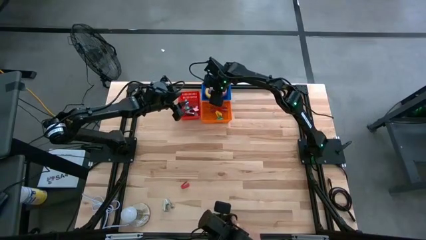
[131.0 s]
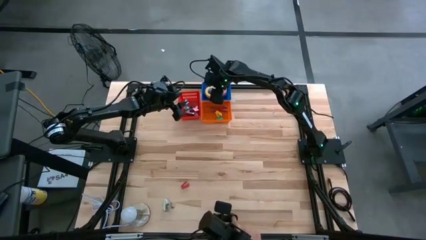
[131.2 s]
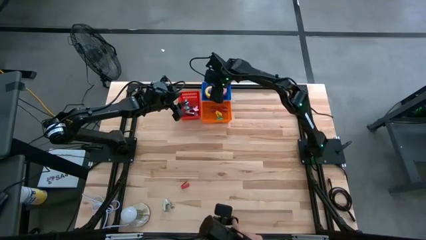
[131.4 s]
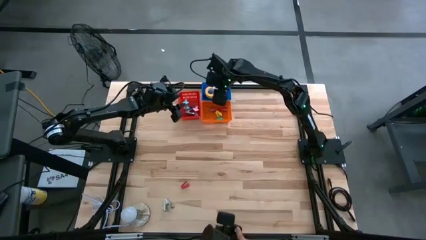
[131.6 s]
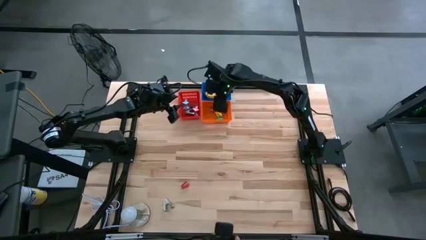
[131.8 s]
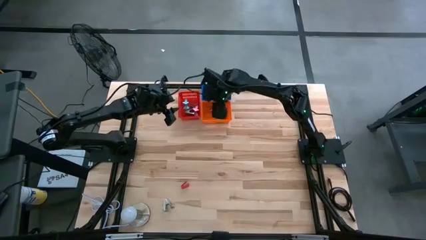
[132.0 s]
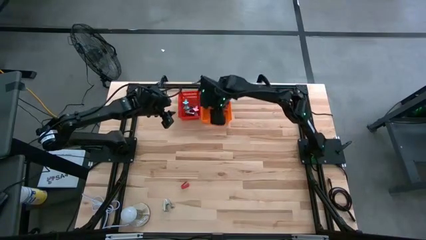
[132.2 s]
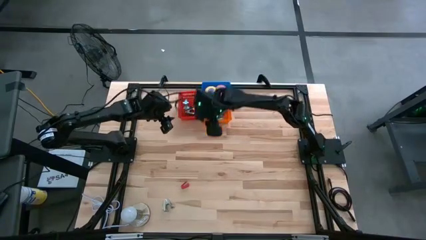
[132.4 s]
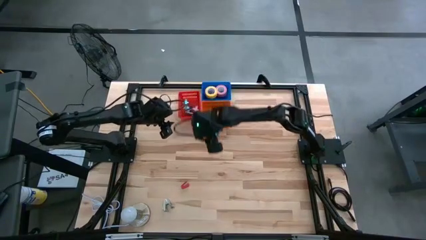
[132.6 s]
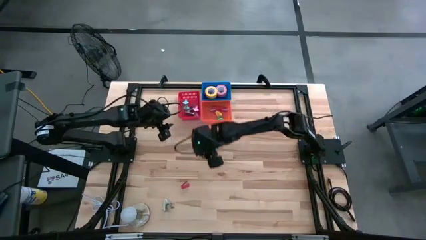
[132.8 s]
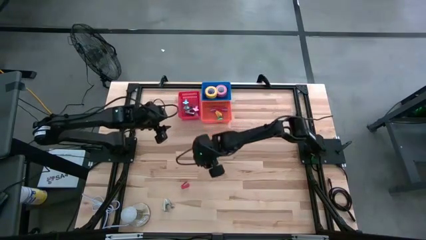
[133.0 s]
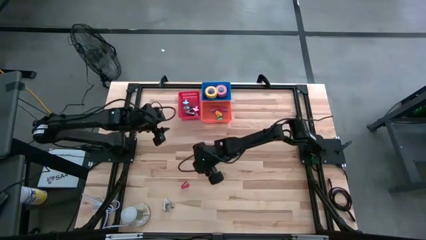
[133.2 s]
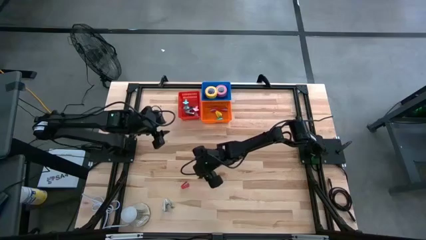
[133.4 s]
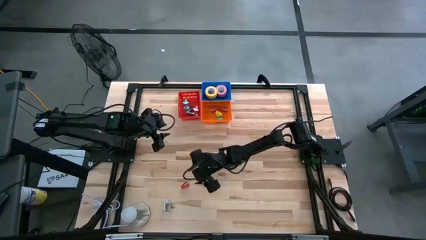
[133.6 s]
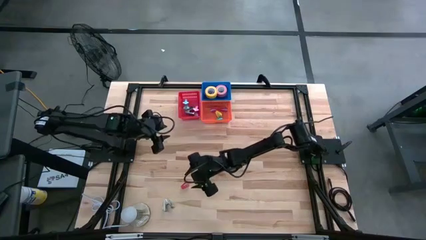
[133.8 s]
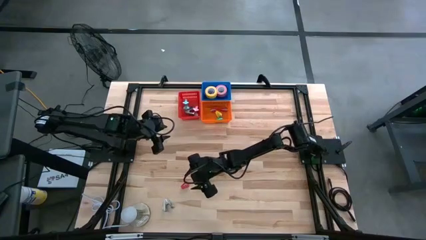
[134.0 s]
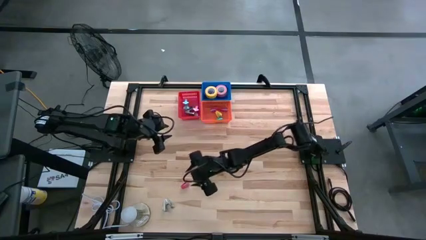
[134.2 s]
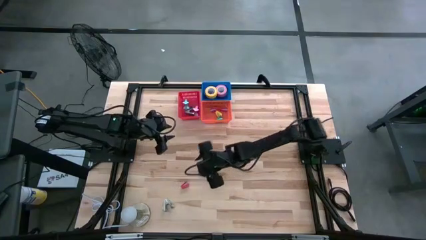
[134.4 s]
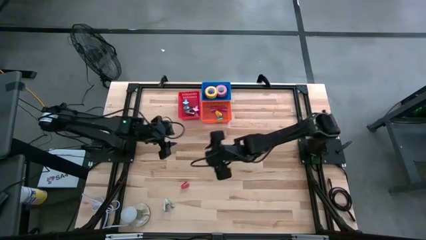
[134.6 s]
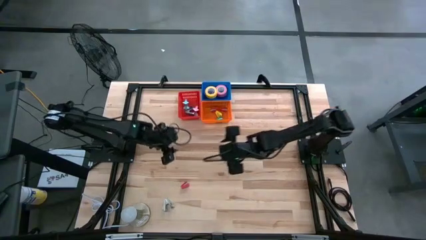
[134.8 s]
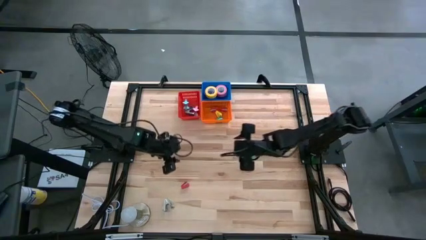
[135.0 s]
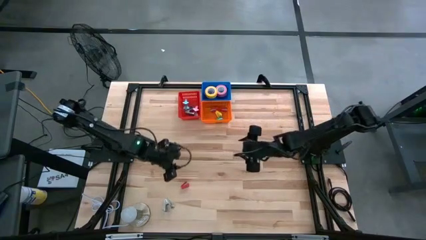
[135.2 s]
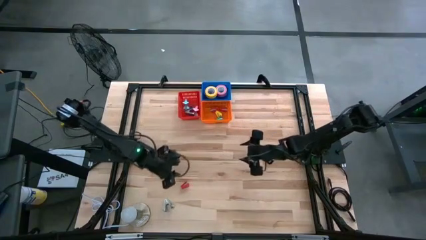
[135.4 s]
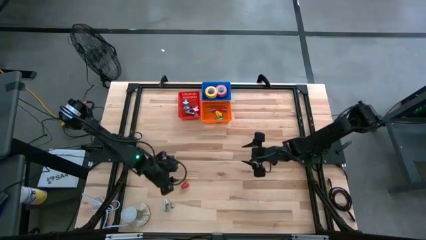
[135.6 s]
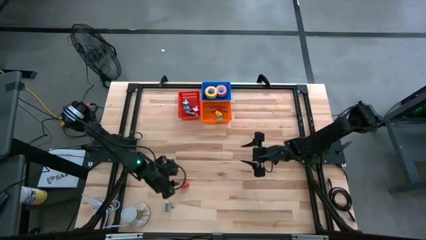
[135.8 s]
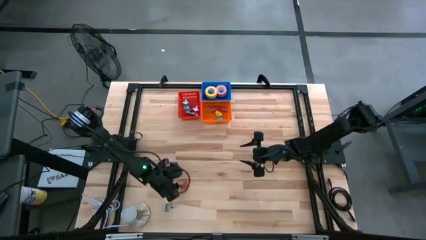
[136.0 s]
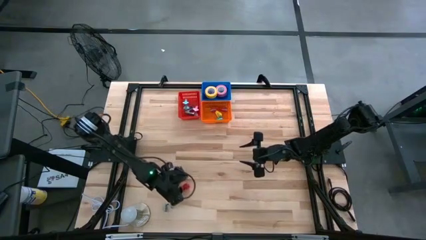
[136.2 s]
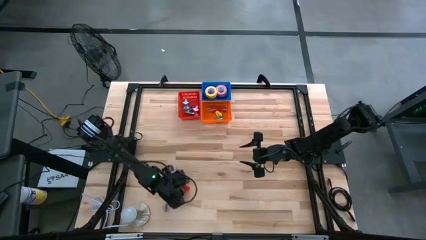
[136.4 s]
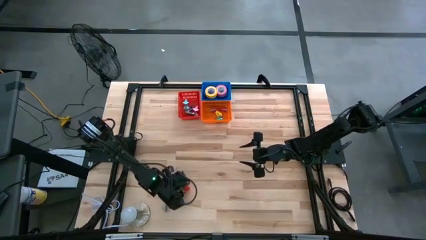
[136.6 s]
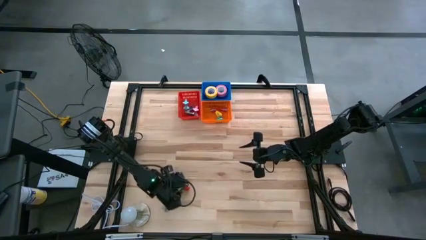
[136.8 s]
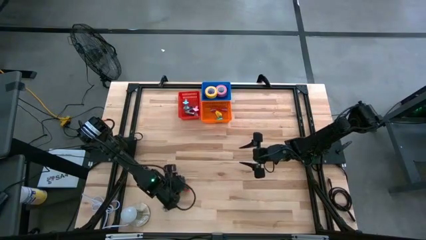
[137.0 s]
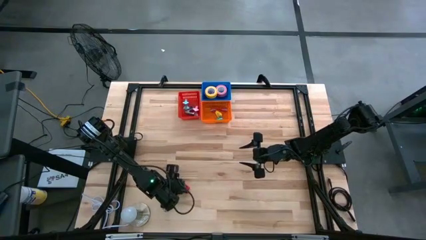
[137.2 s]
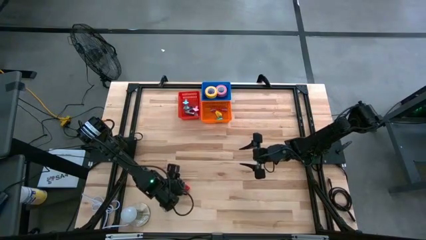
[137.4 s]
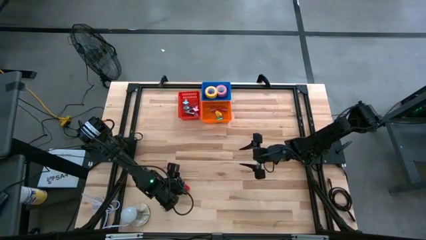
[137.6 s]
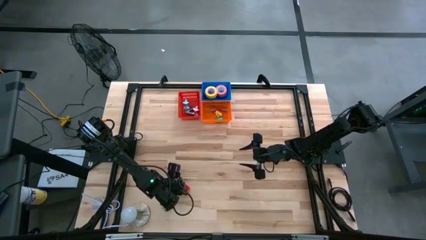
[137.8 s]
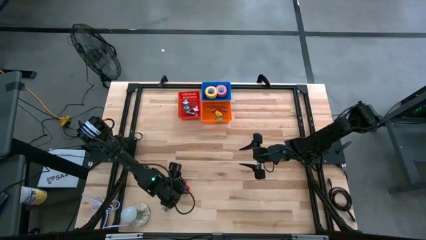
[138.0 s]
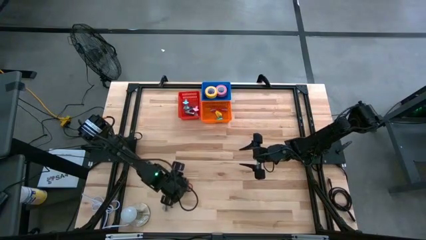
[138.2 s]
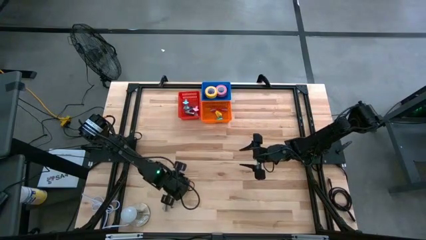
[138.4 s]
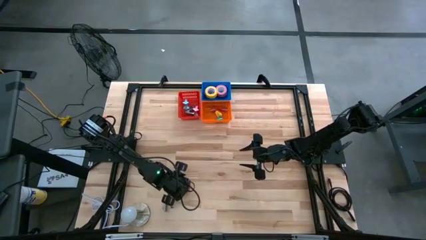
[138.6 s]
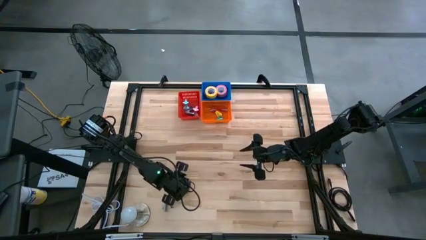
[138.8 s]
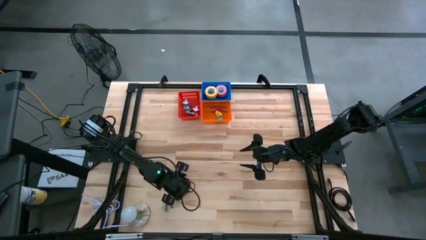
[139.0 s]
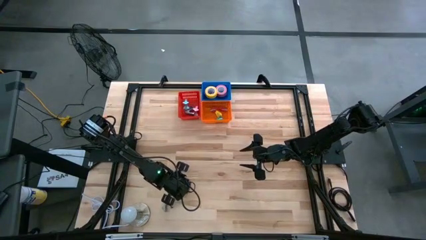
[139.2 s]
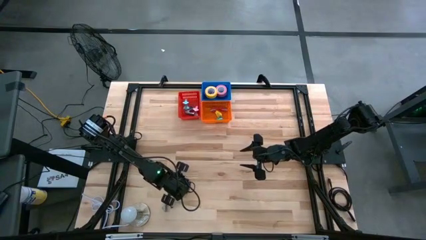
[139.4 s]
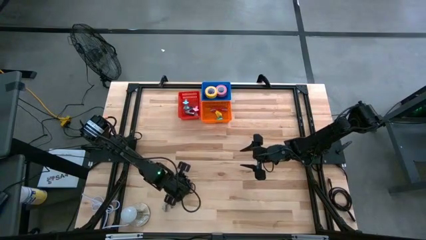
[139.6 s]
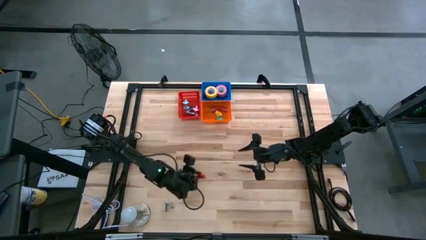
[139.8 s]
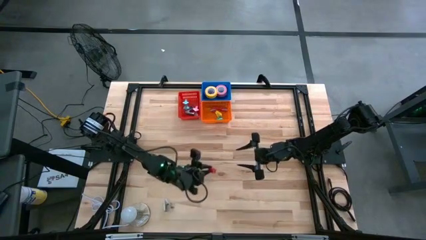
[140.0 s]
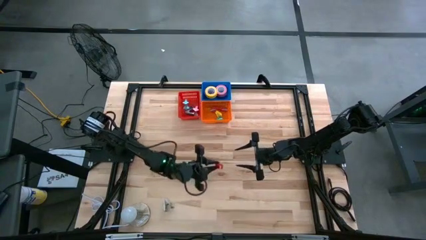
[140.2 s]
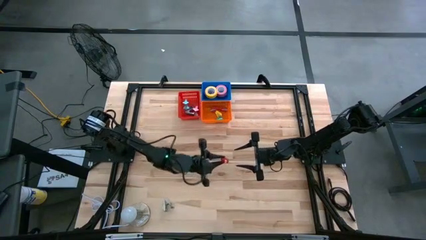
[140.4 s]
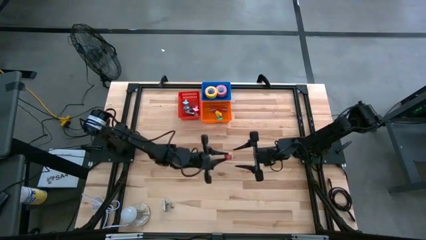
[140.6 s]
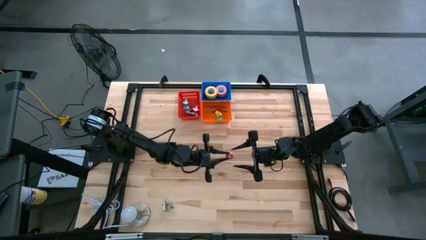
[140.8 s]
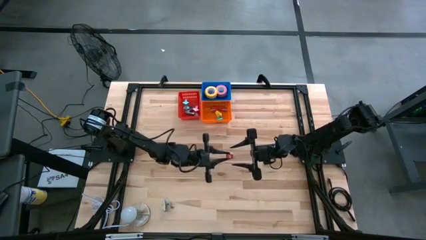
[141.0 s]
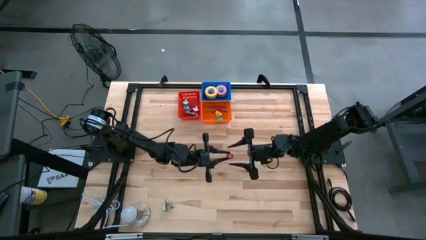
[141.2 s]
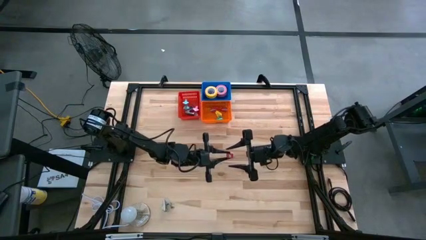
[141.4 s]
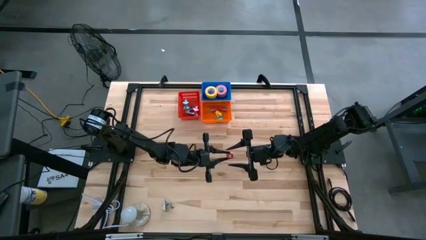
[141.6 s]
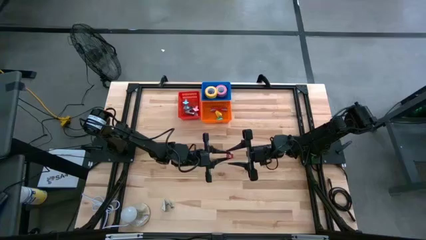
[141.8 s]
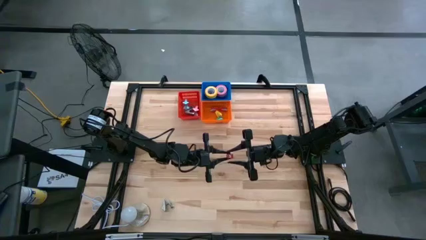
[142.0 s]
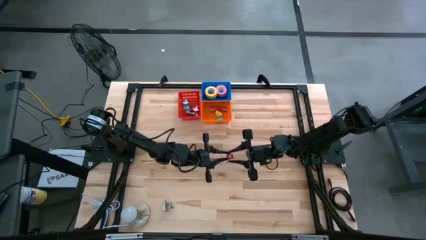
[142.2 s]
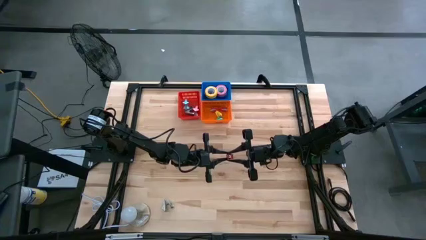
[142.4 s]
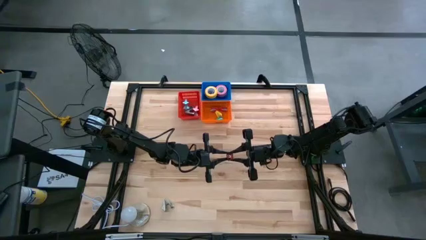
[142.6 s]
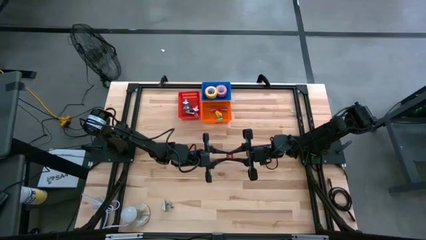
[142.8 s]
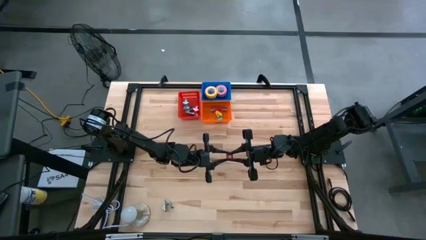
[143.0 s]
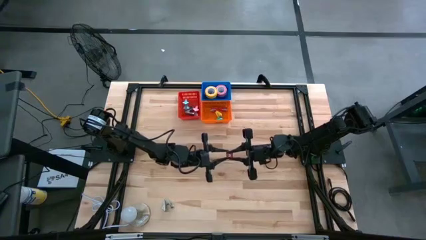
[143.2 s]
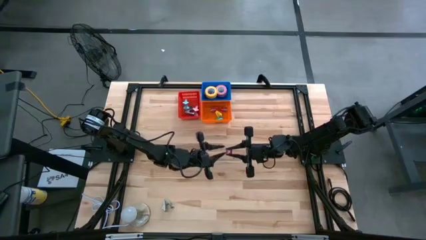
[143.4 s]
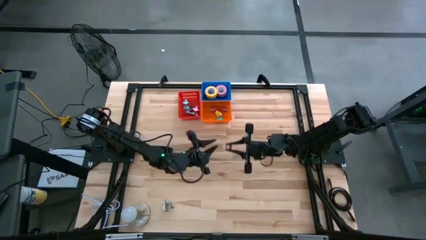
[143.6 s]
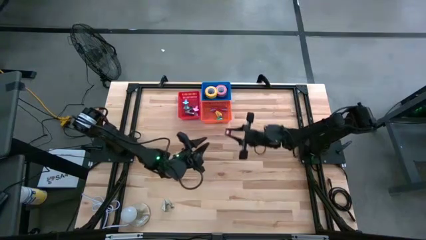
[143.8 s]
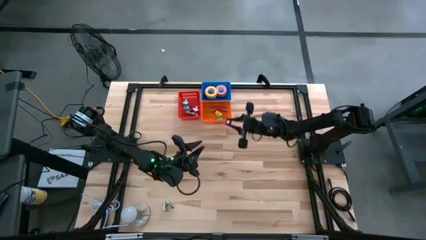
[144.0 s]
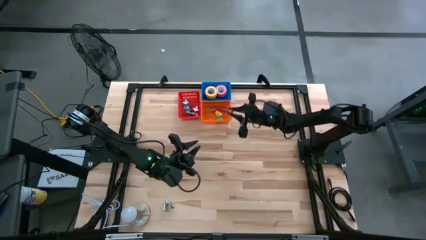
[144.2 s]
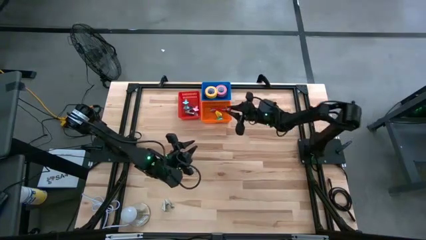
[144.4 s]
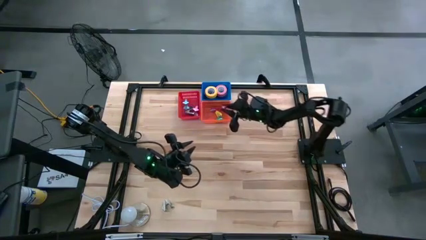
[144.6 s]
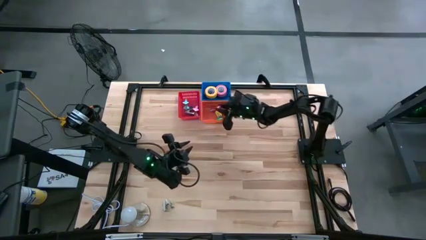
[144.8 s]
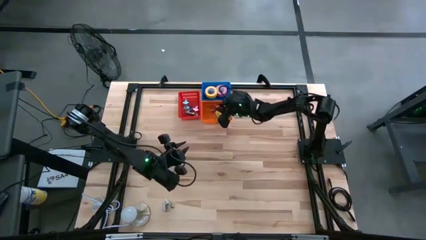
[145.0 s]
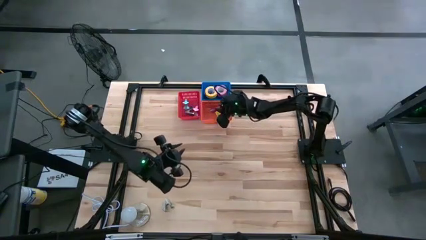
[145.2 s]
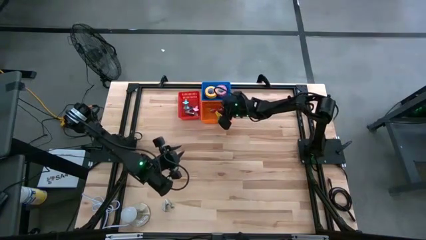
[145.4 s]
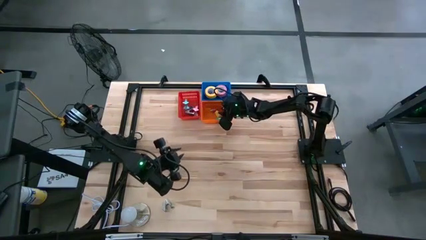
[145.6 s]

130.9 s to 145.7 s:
Task: Pick and place Stapler, Stapler remover, tape
Put the red stapler into the orange bin
